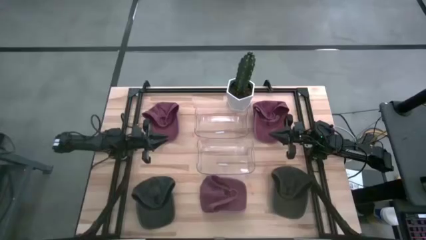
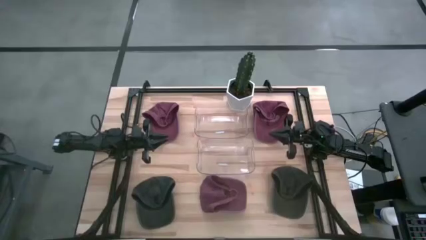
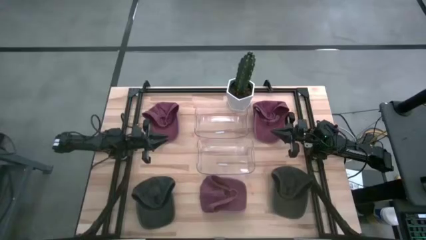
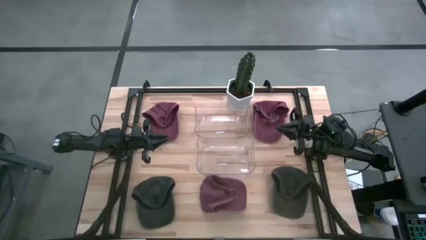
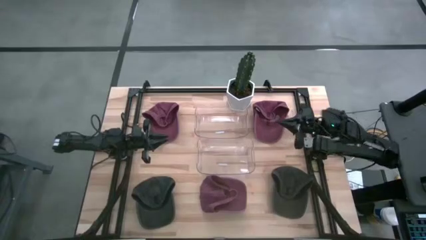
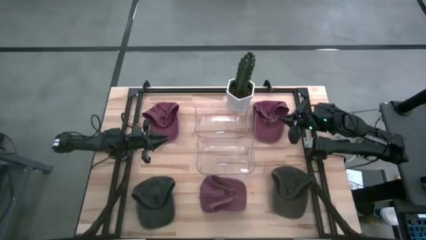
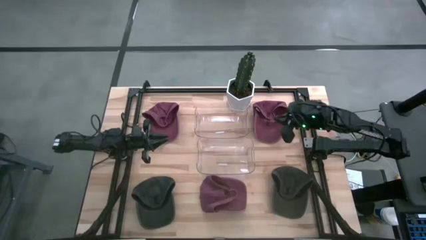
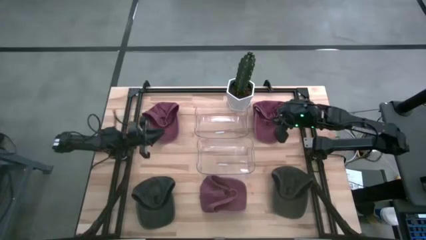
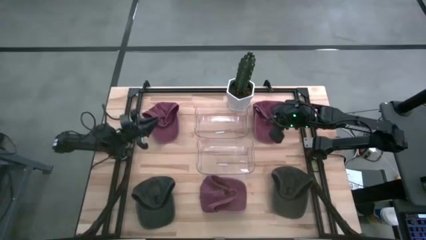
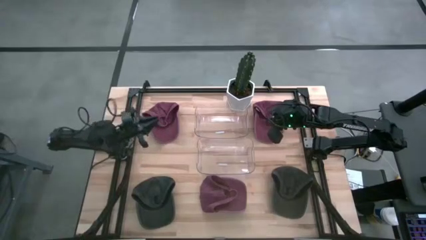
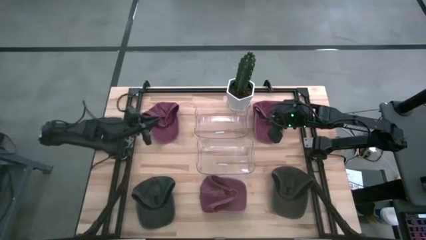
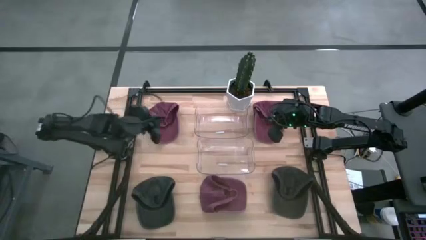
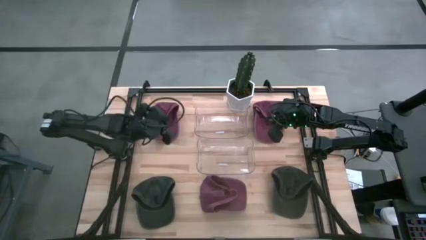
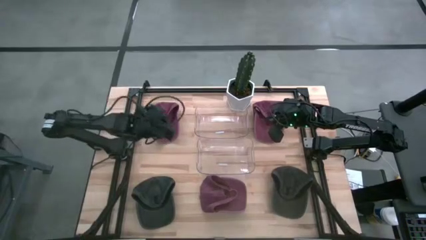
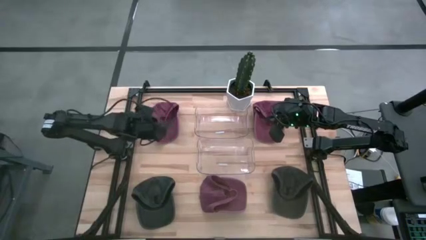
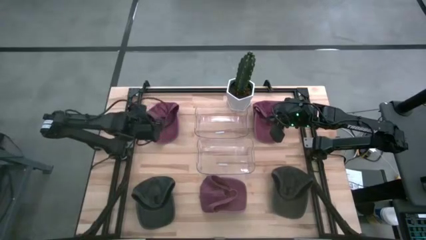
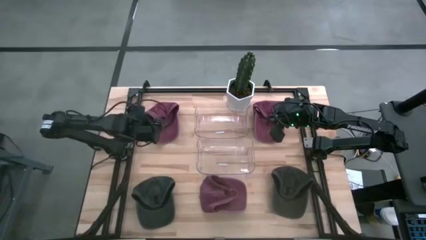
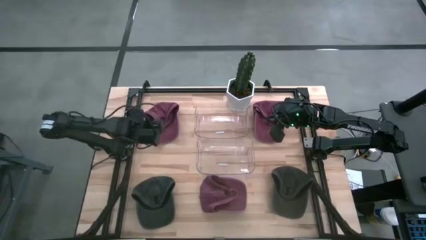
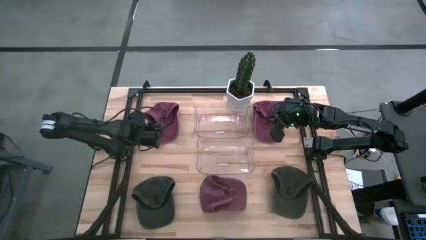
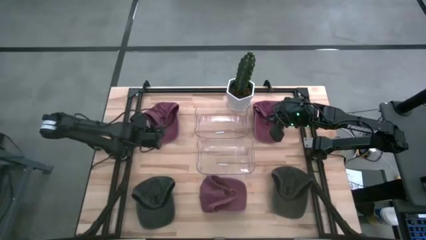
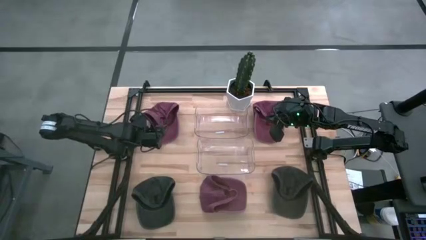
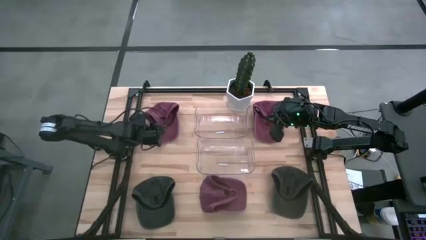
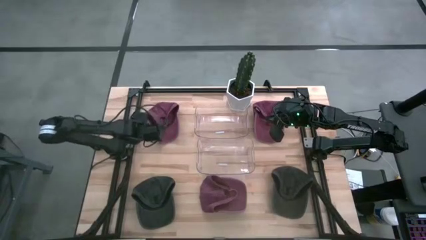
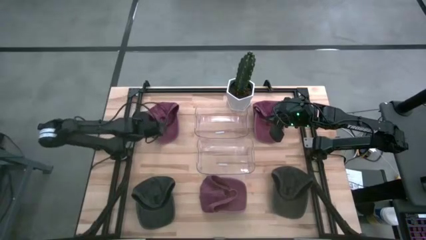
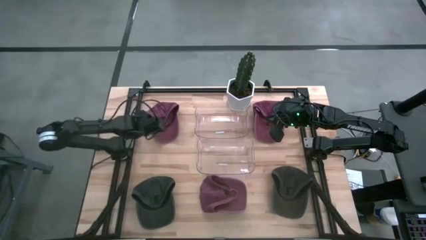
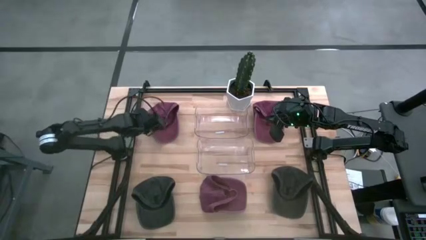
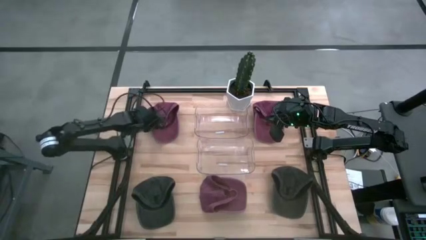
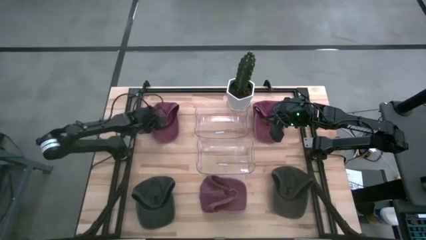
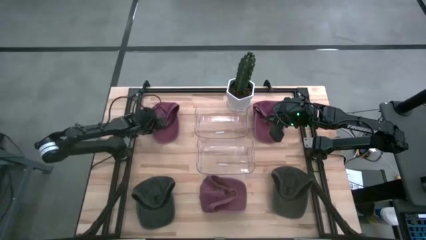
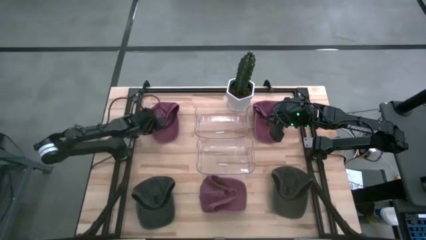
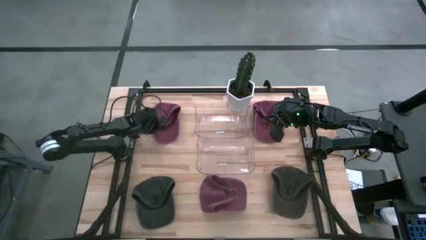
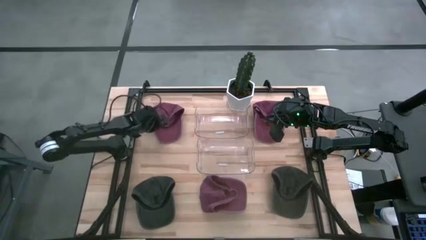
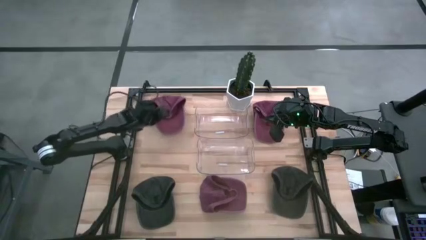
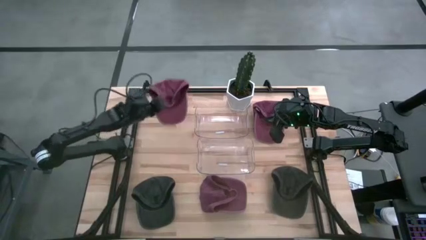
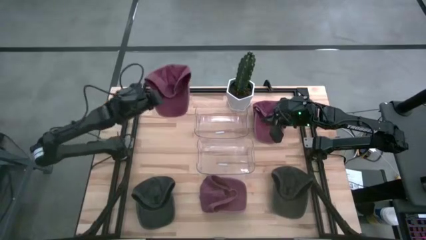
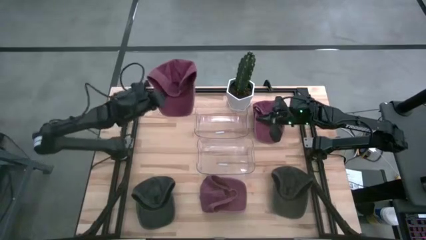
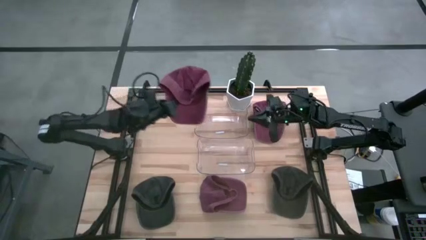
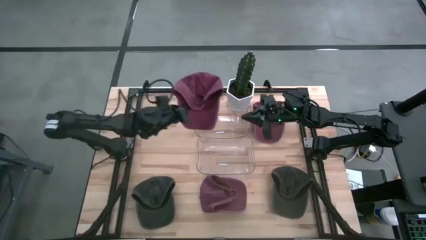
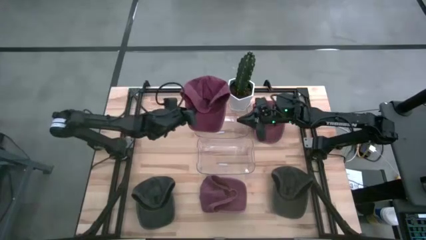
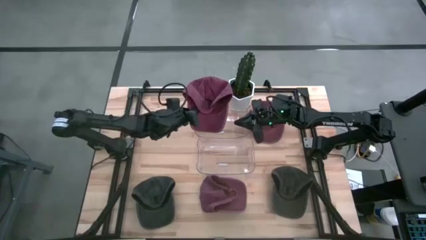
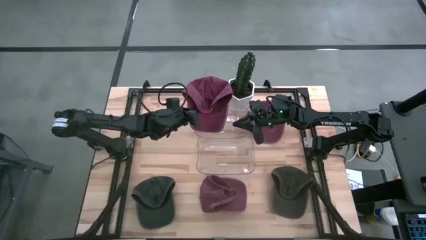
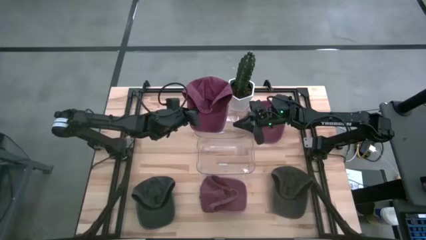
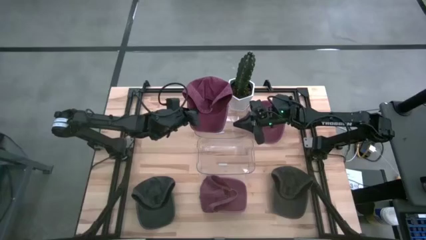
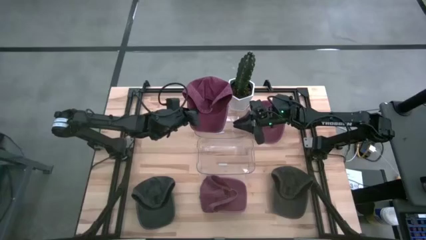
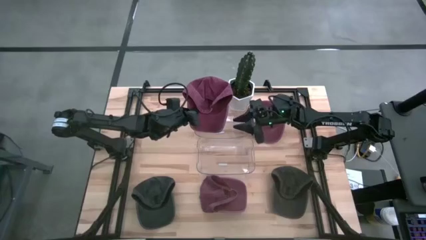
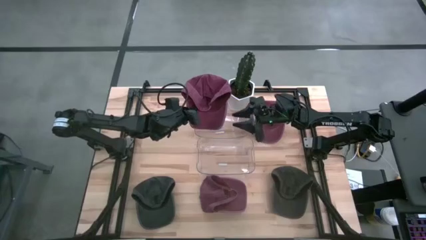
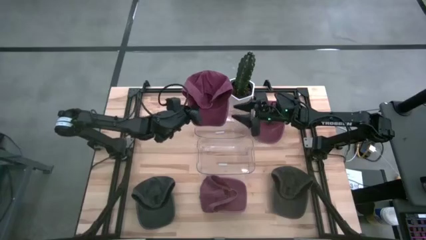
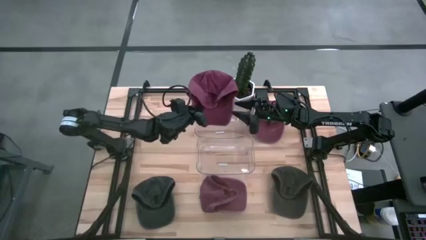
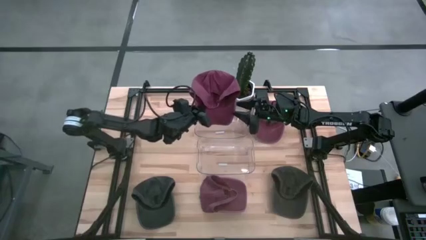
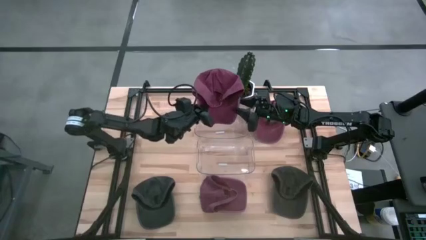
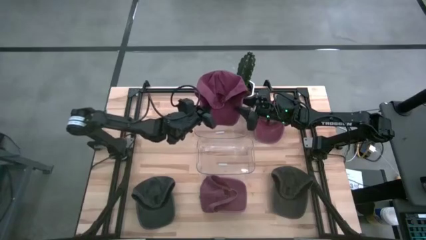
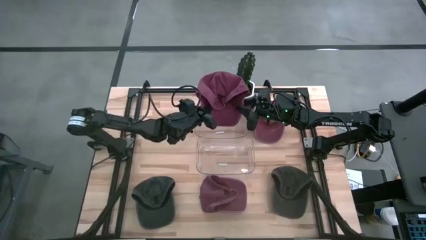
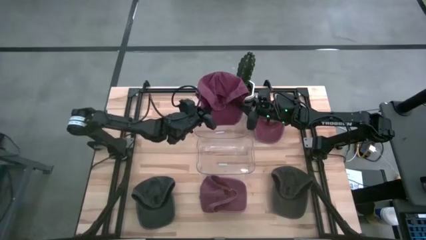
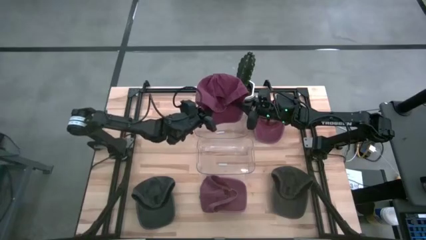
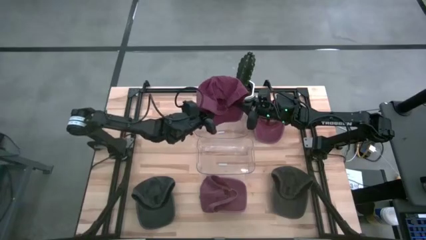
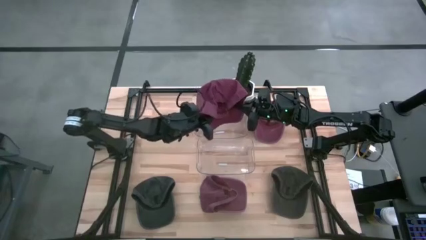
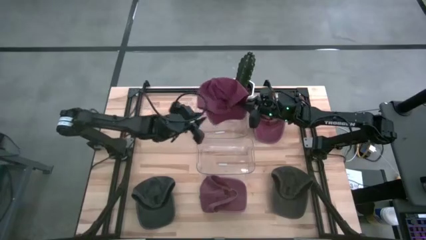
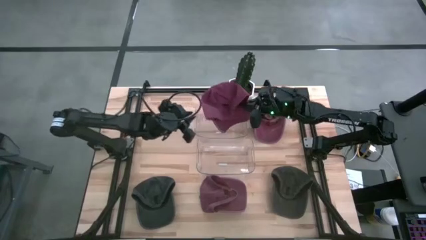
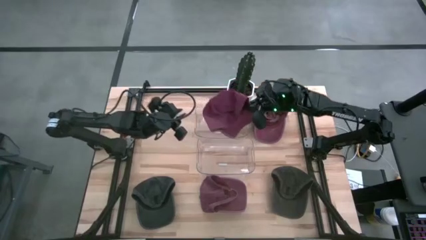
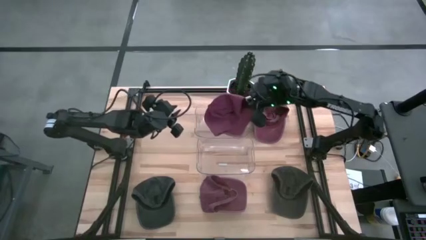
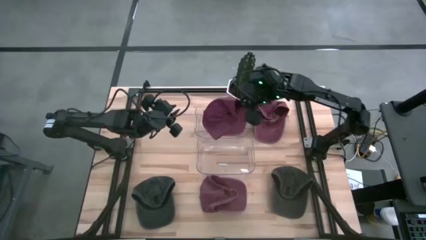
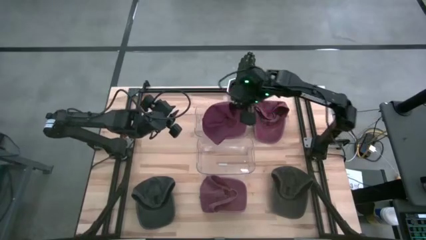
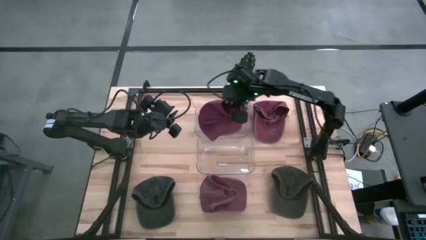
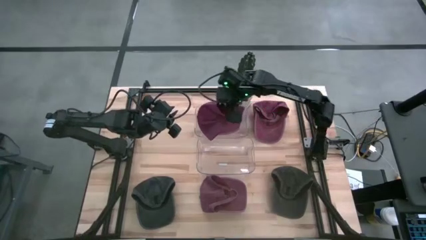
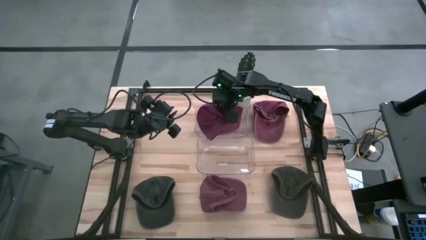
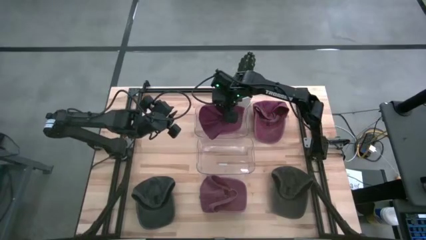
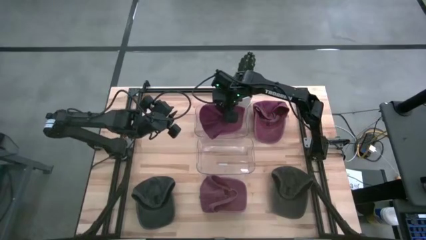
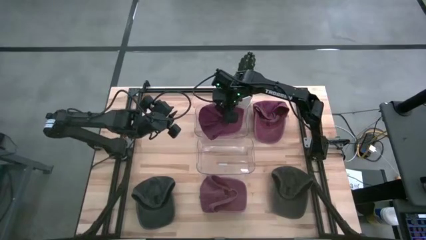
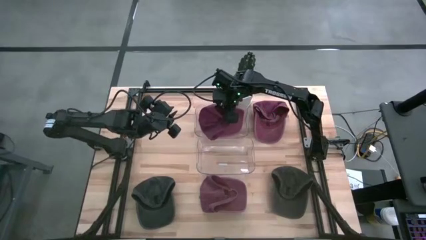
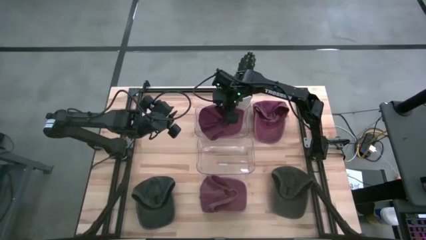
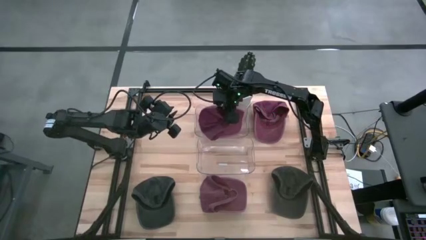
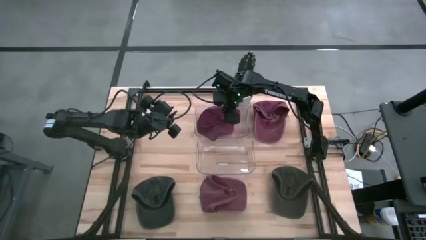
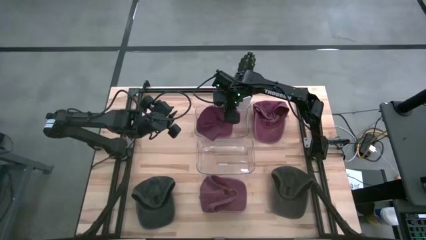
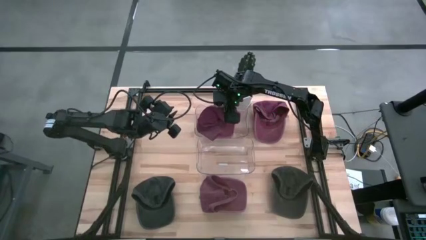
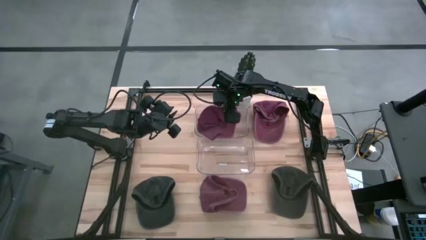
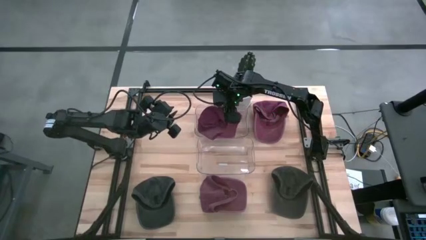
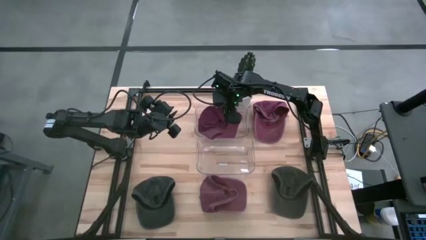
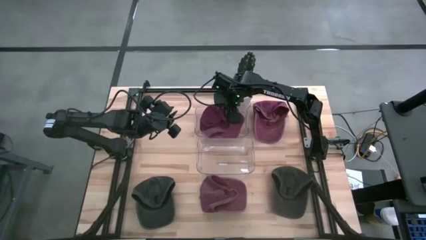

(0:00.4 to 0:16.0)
Task: Pick & Place hat
Put the top left red cap into the top transparent bin
